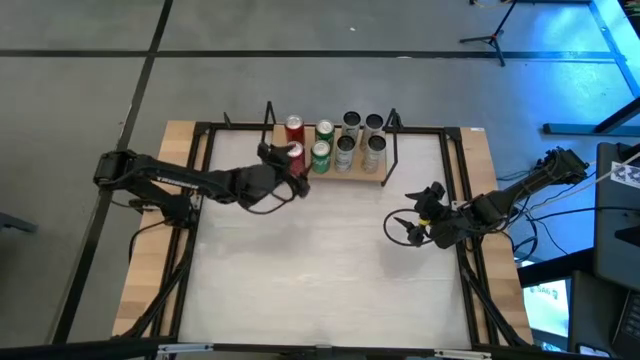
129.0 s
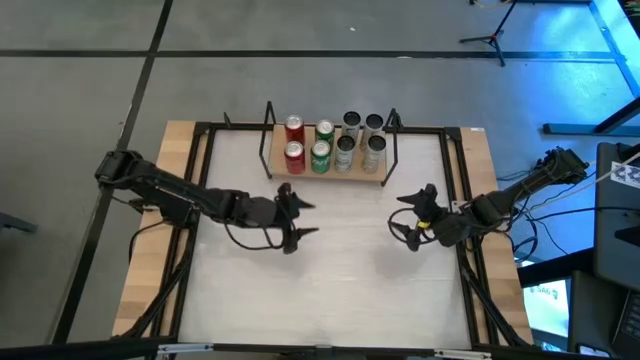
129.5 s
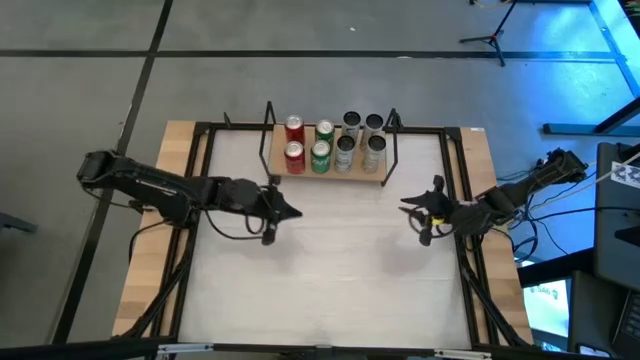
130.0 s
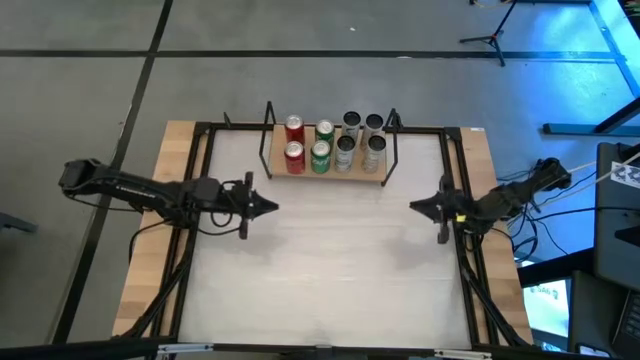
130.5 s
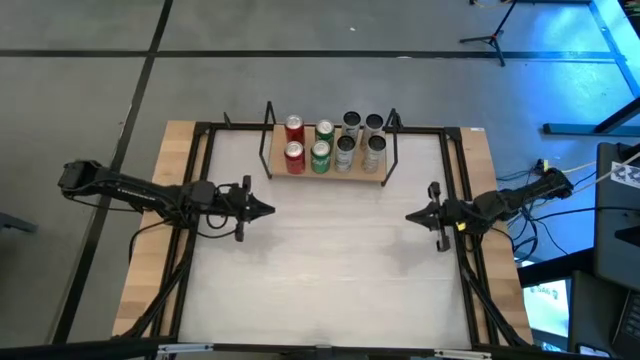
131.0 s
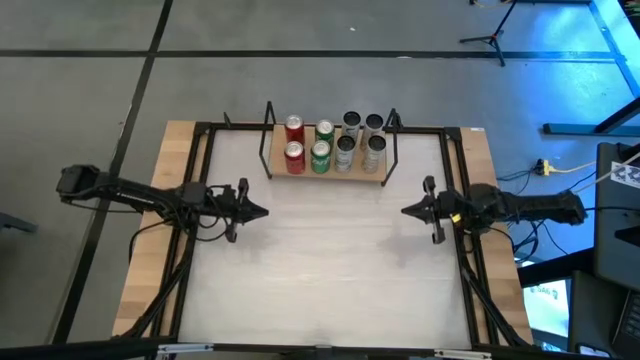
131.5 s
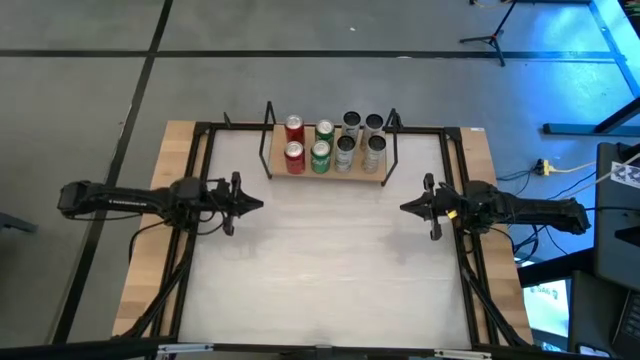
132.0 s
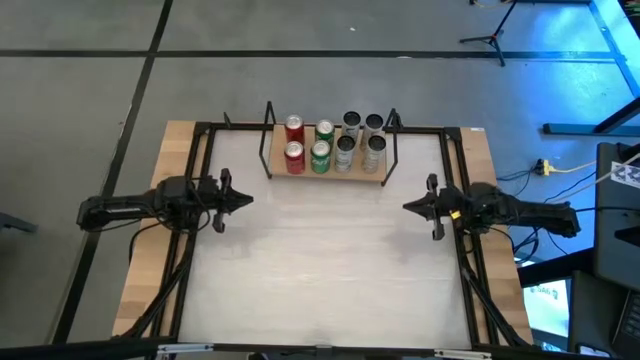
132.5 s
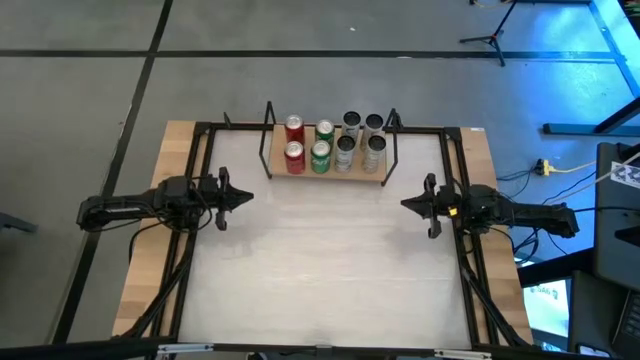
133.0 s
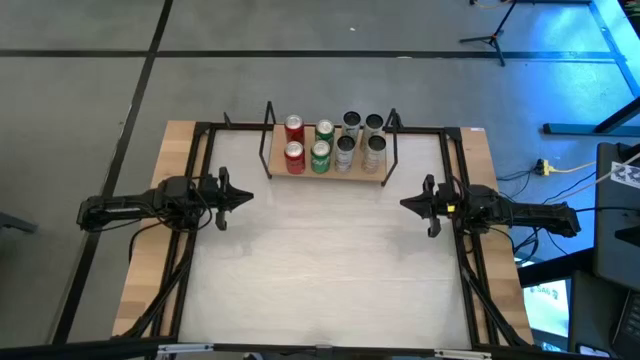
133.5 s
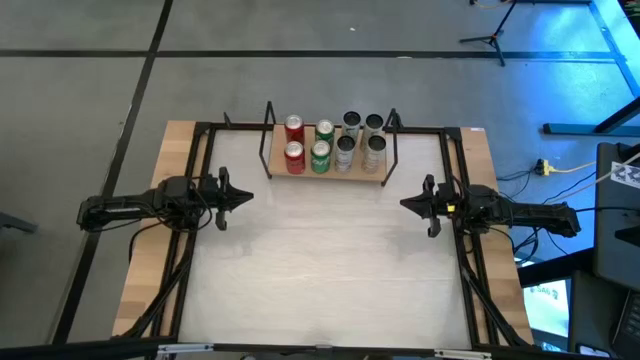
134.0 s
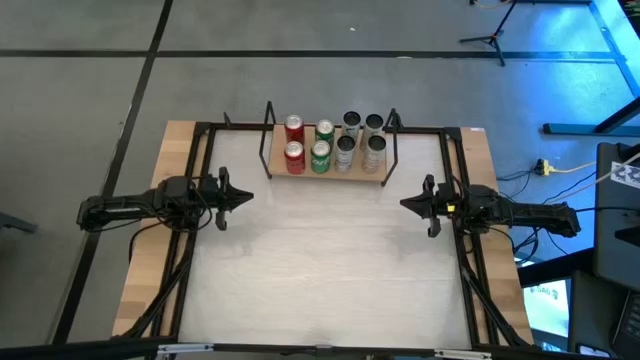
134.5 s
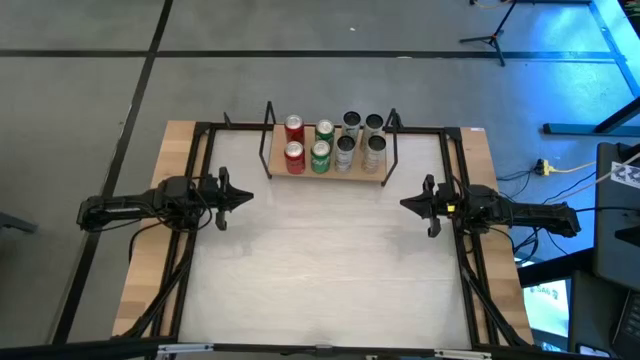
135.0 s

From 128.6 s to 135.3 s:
Task: Place canned beverage on shelf
Return to Home Position

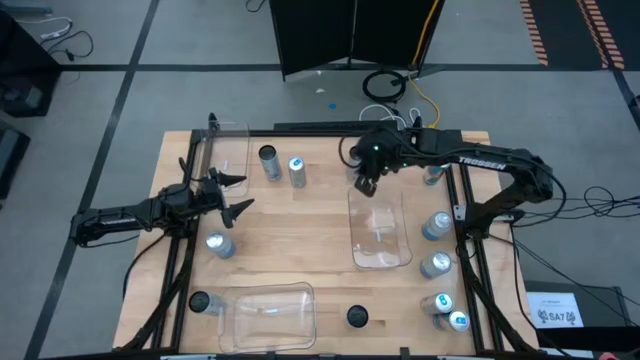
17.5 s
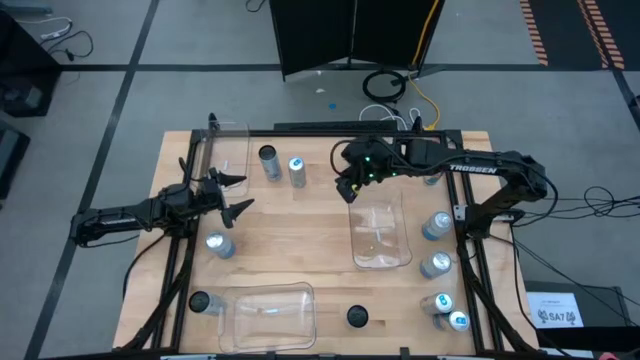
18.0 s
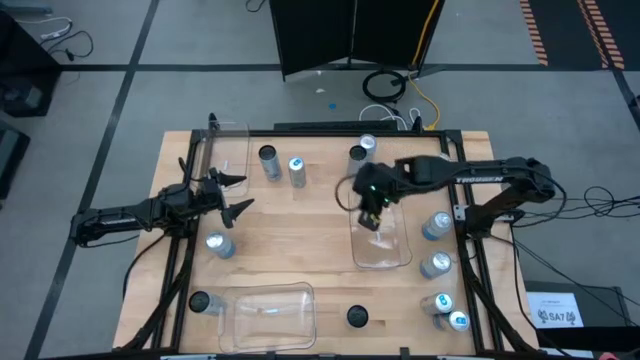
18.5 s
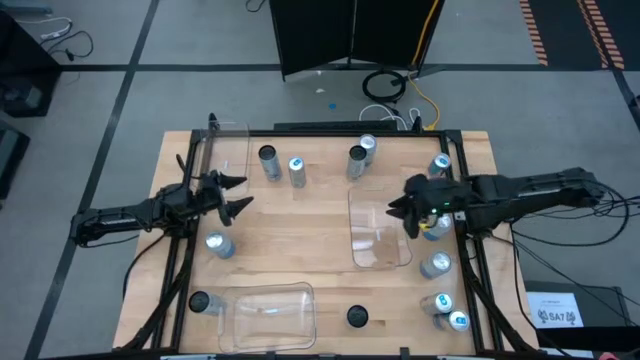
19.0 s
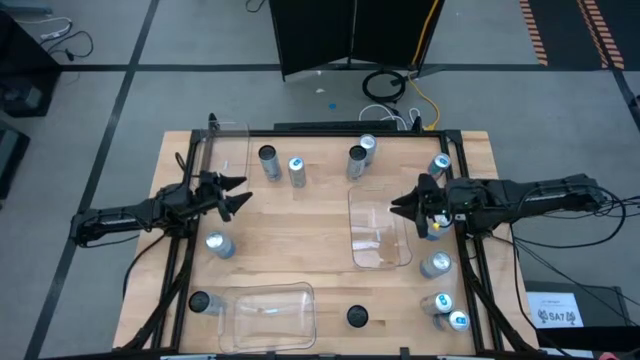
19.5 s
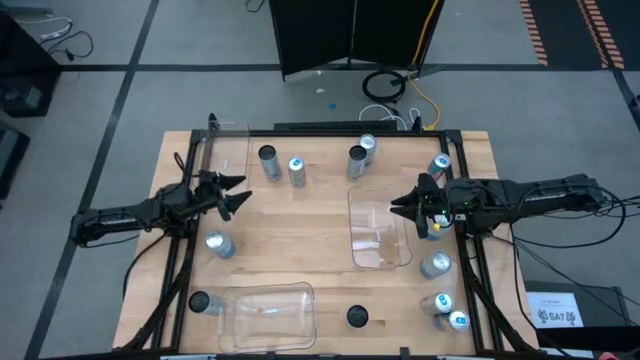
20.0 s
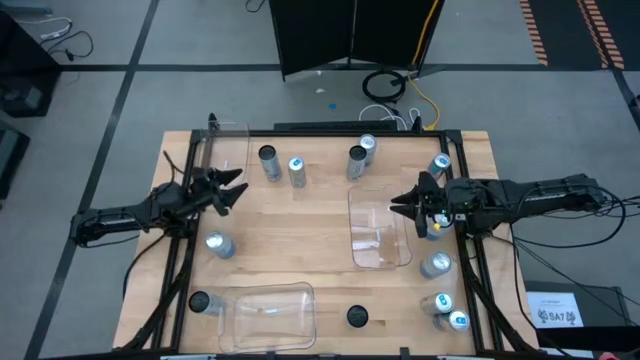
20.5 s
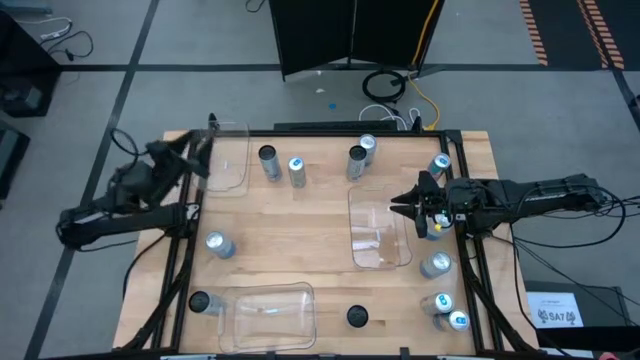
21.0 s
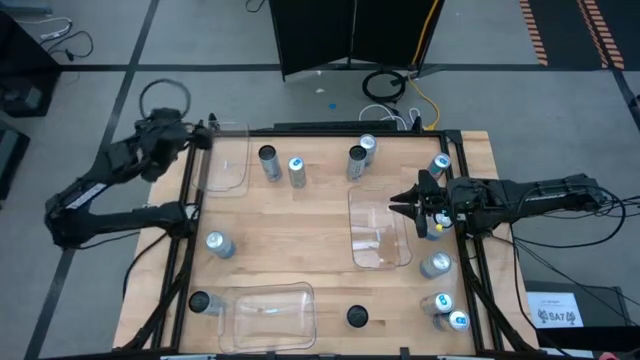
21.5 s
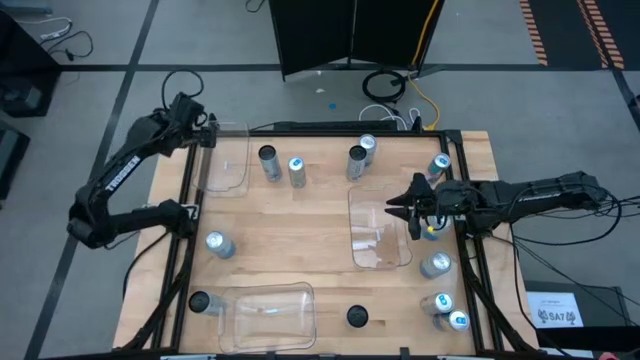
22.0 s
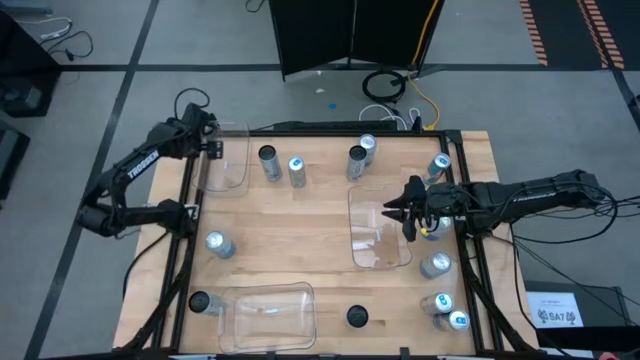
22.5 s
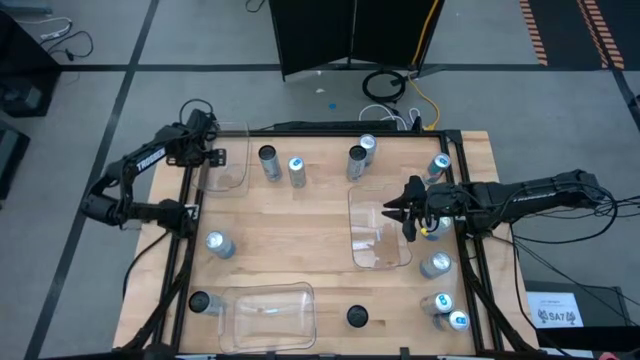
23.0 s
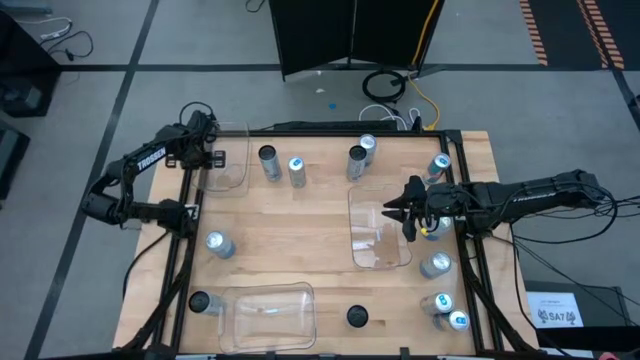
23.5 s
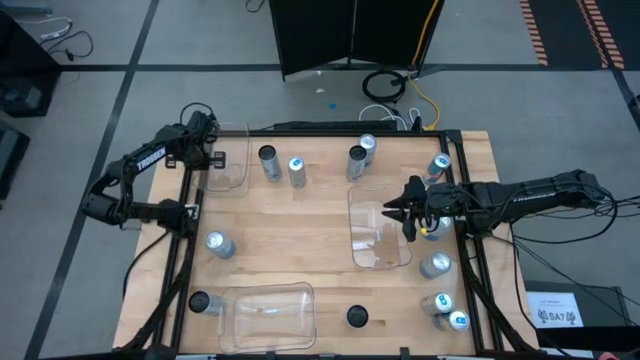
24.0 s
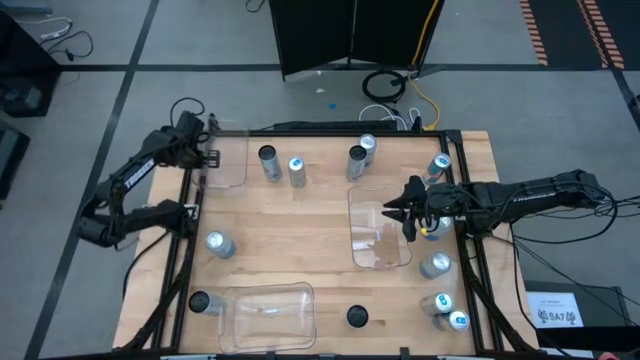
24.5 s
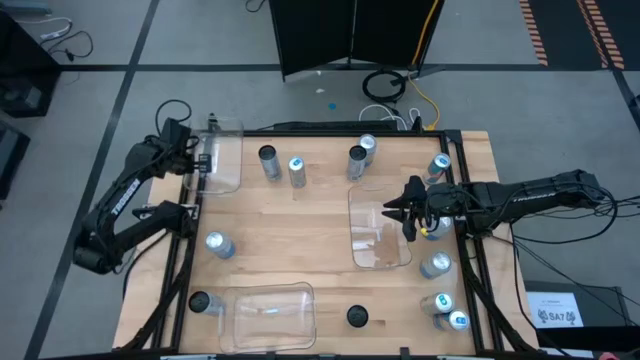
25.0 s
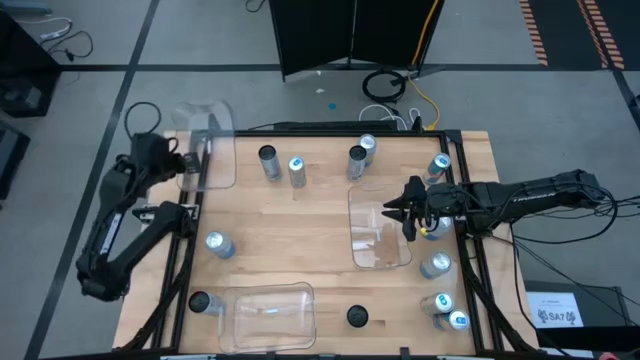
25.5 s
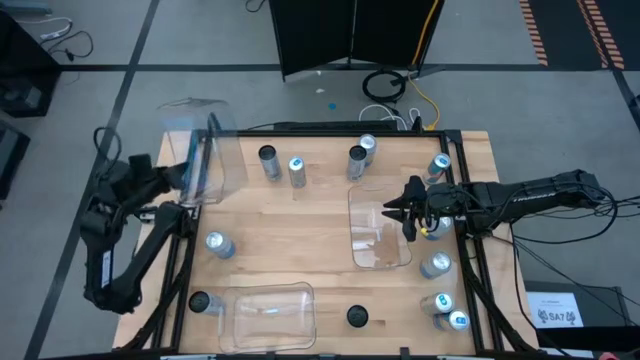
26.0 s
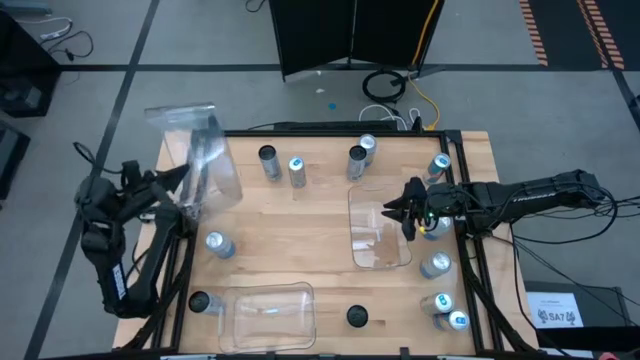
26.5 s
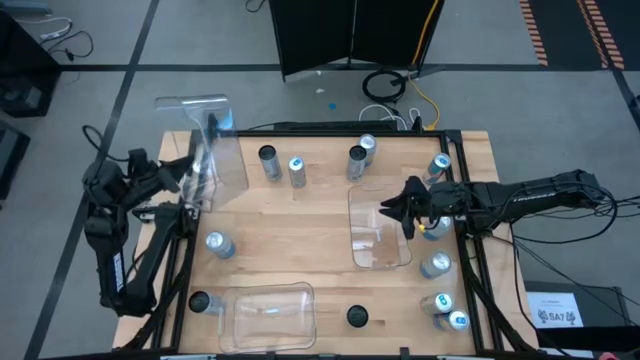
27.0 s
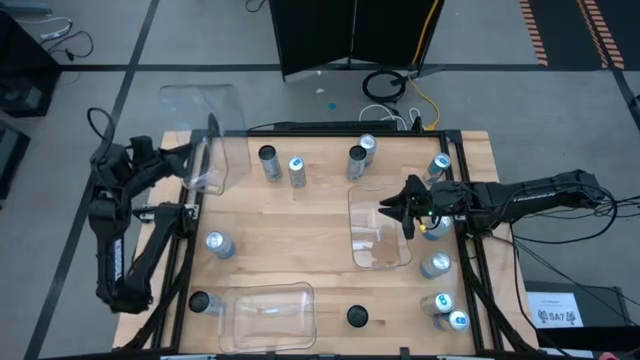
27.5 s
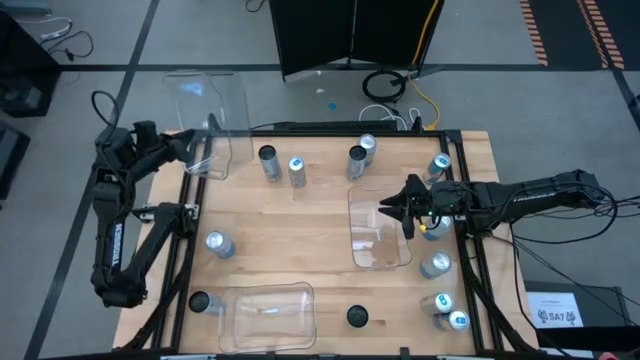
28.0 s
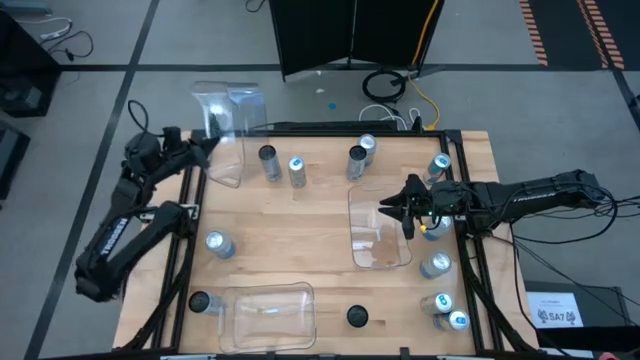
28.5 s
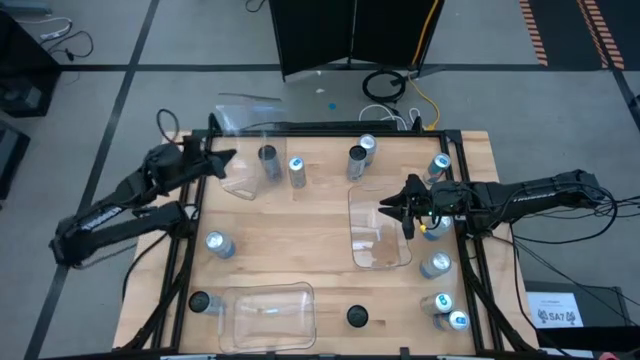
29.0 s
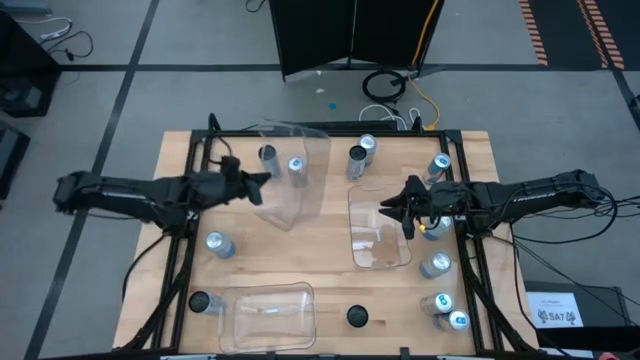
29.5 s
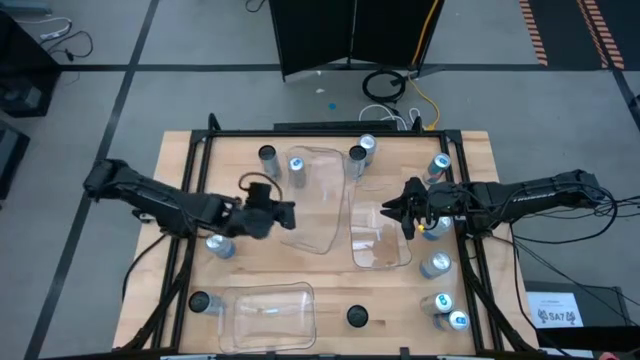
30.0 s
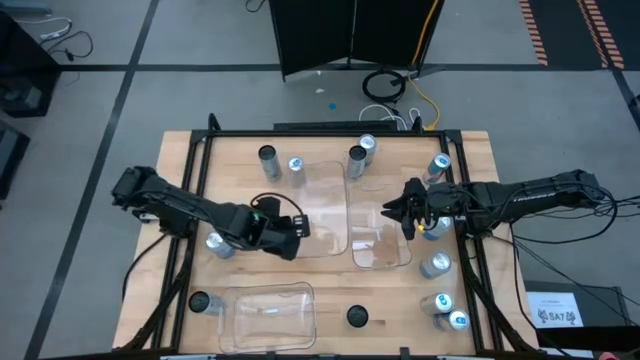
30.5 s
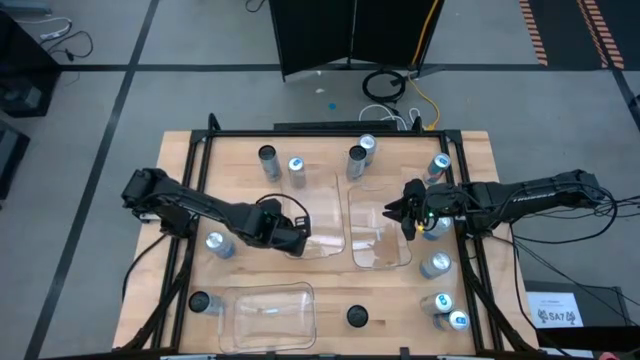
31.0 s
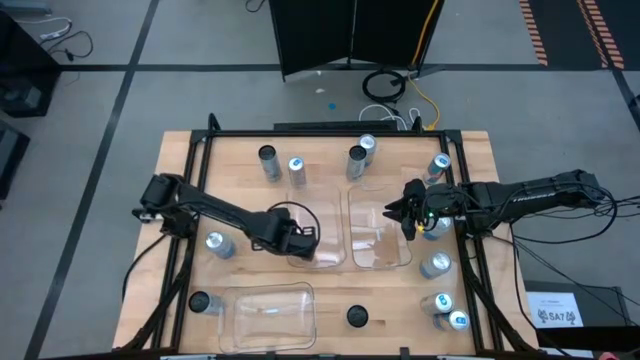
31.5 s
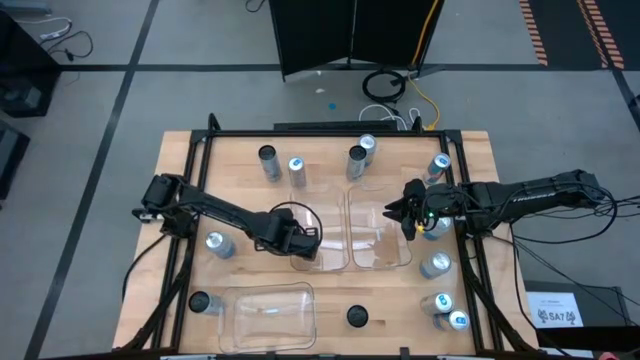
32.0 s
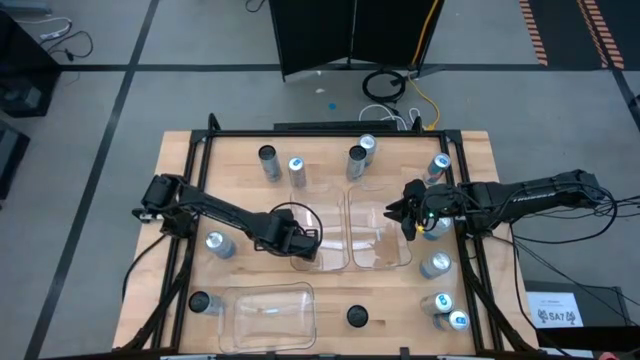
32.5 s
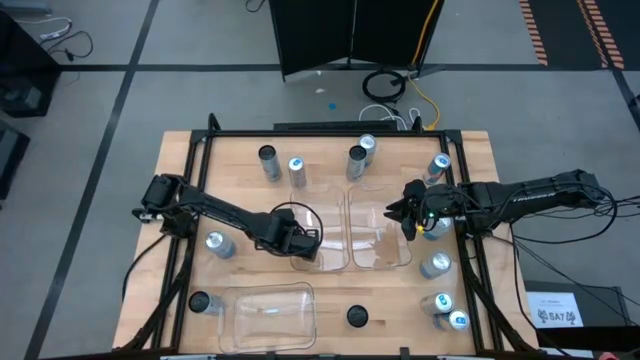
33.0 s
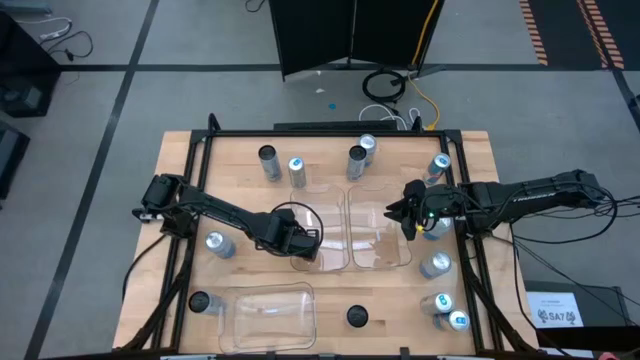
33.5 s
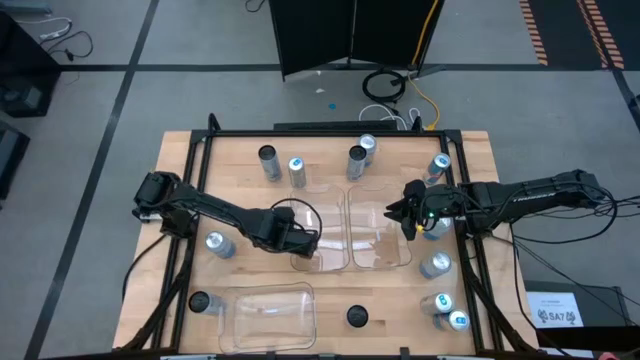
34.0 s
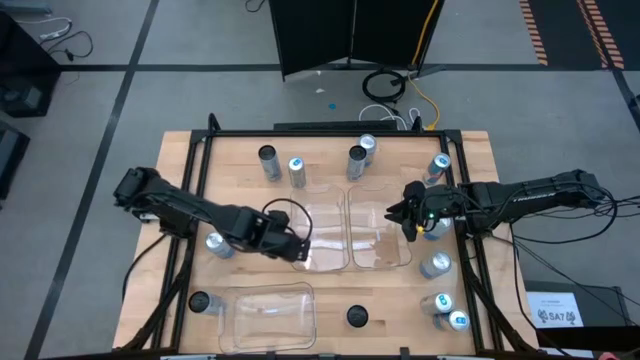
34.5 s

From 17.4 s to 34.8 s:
Task: Sort soda cans
Move the top left transparent bin to the middle of the table
